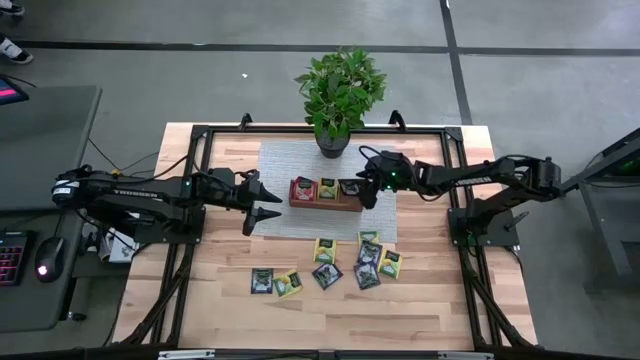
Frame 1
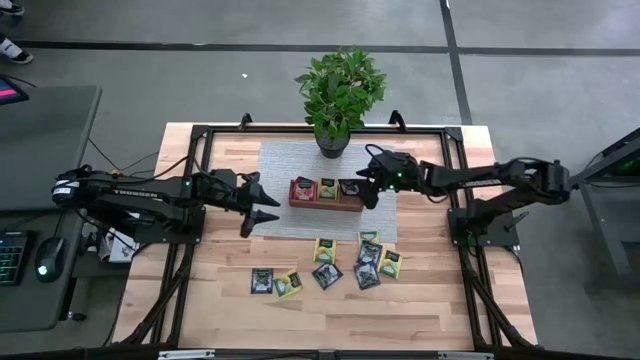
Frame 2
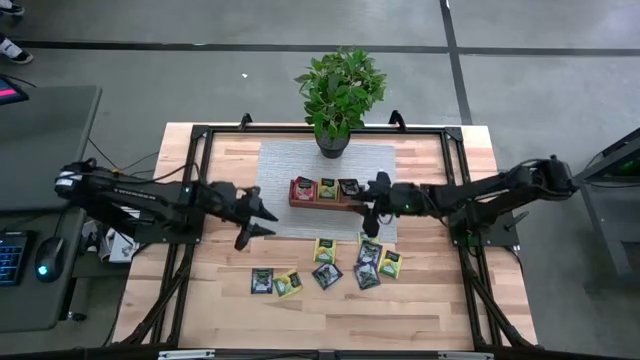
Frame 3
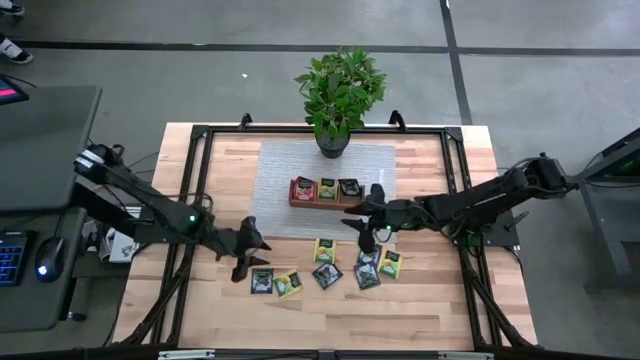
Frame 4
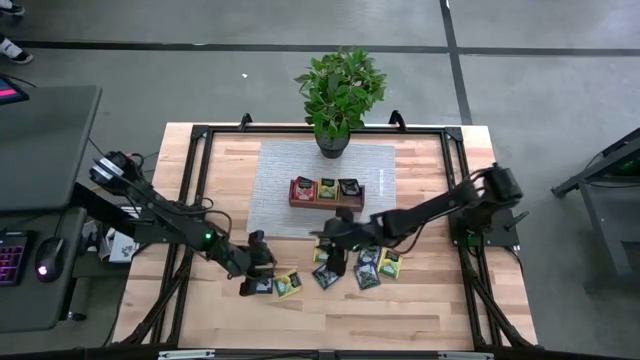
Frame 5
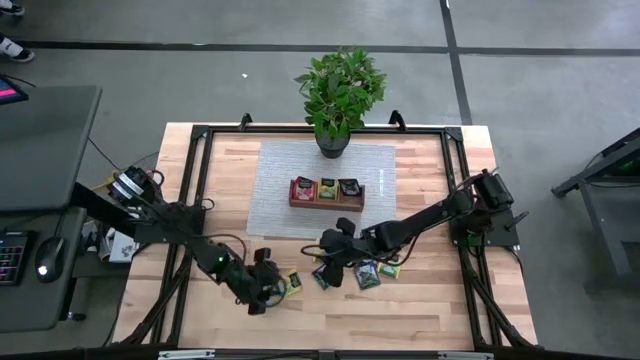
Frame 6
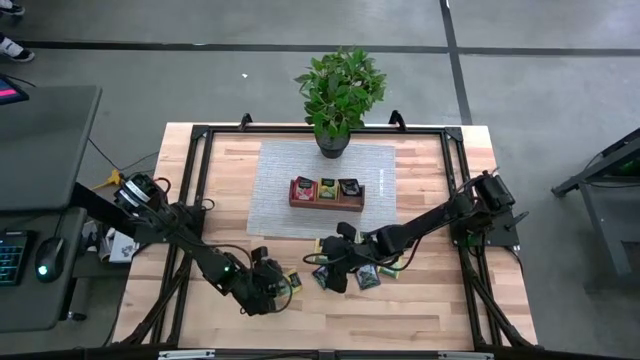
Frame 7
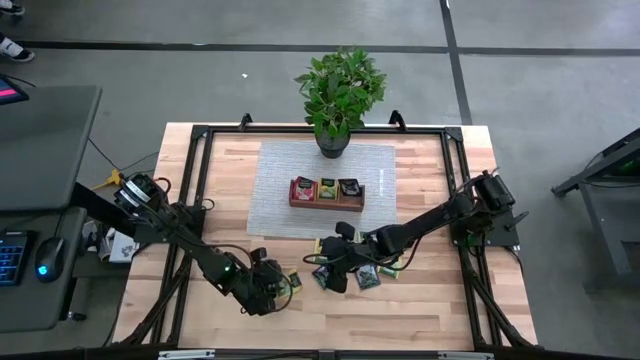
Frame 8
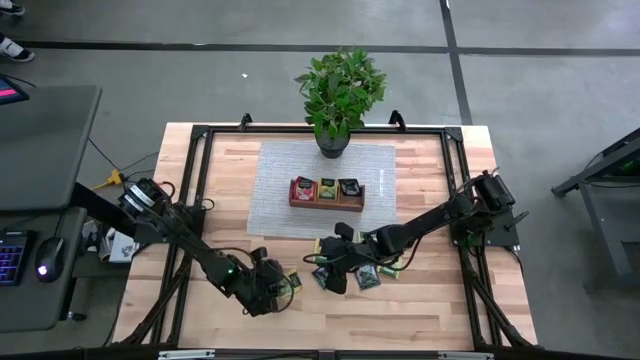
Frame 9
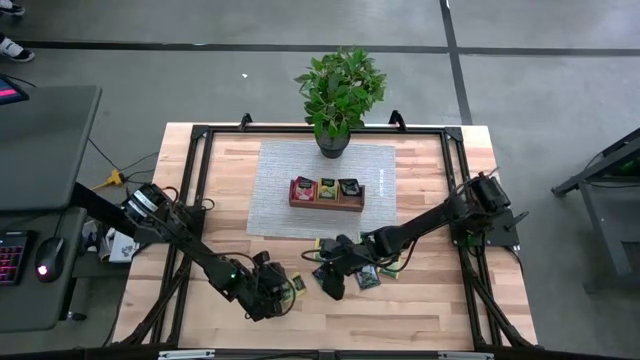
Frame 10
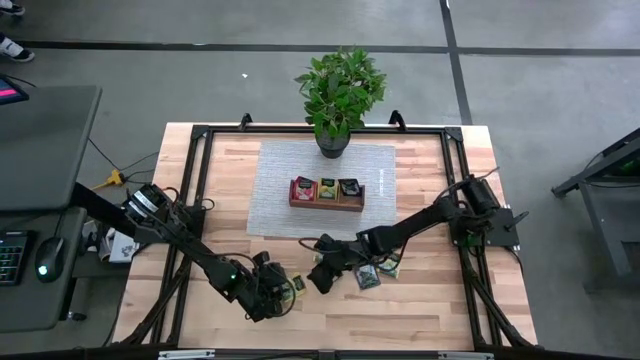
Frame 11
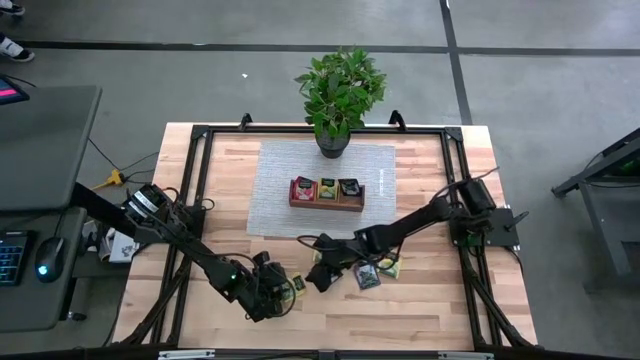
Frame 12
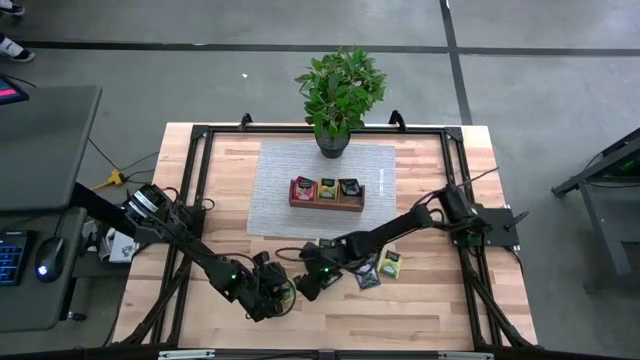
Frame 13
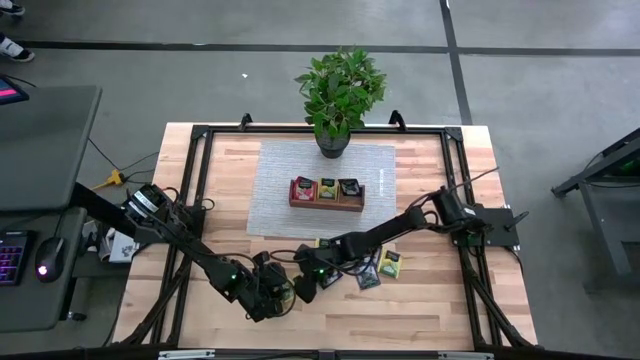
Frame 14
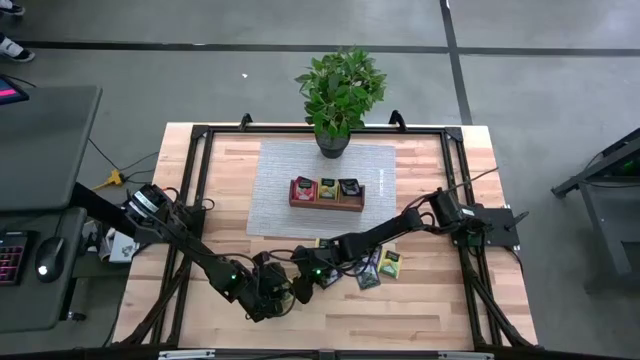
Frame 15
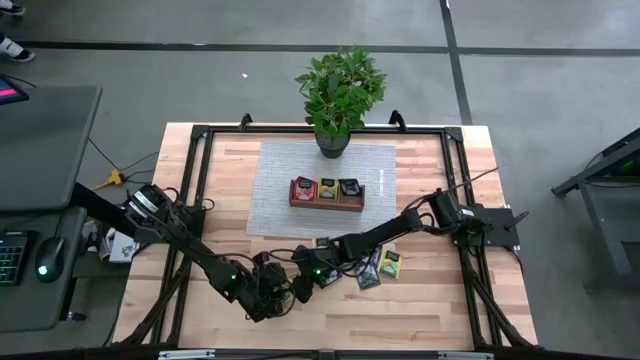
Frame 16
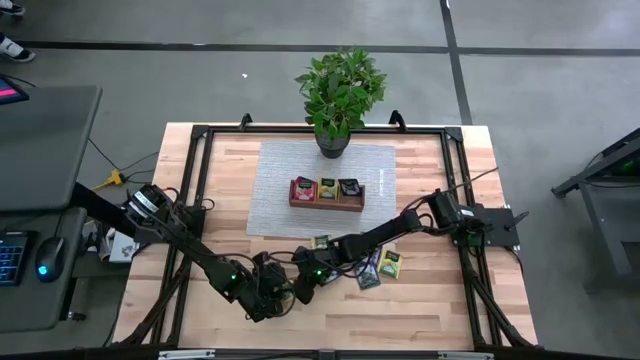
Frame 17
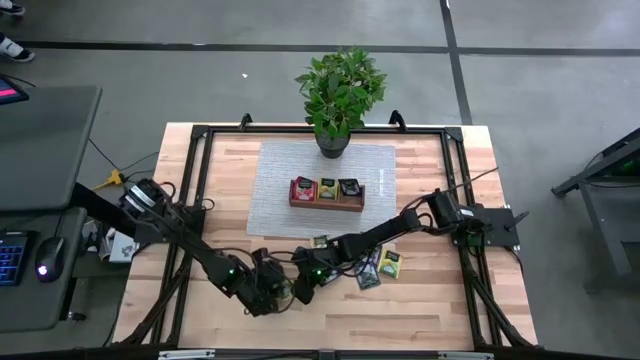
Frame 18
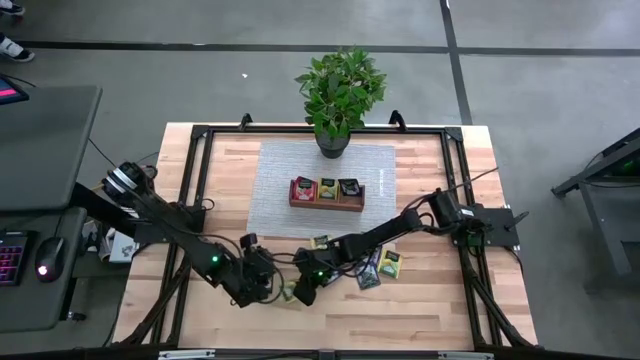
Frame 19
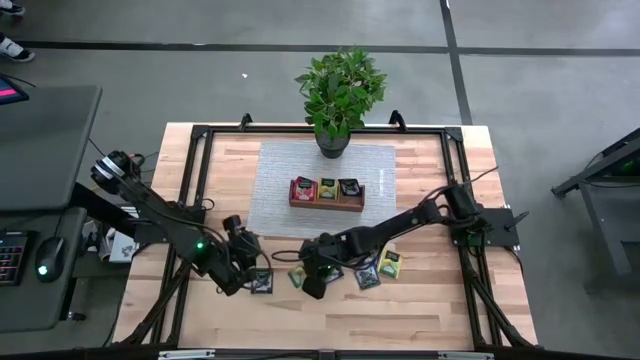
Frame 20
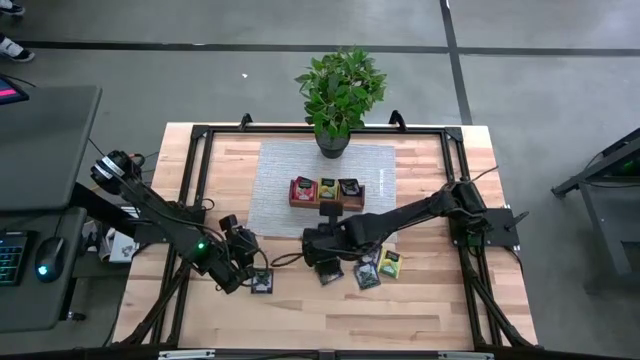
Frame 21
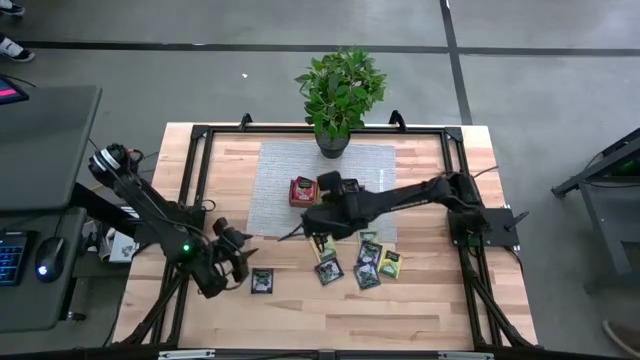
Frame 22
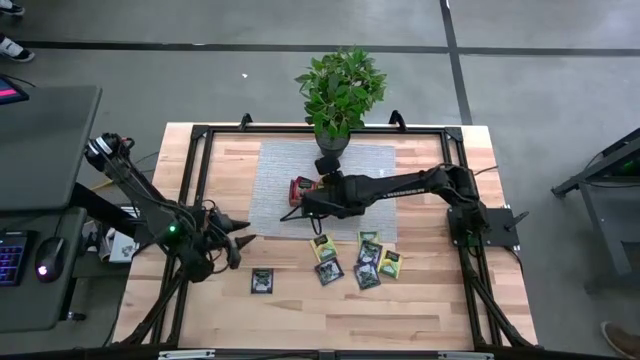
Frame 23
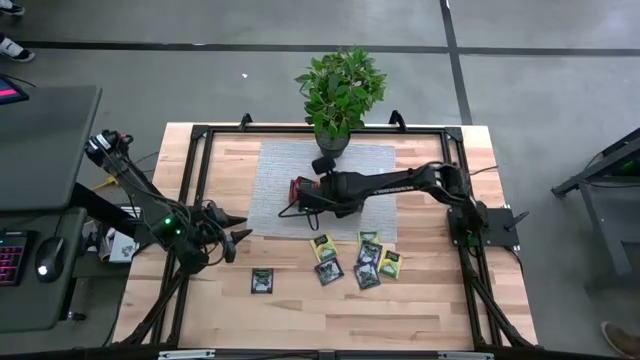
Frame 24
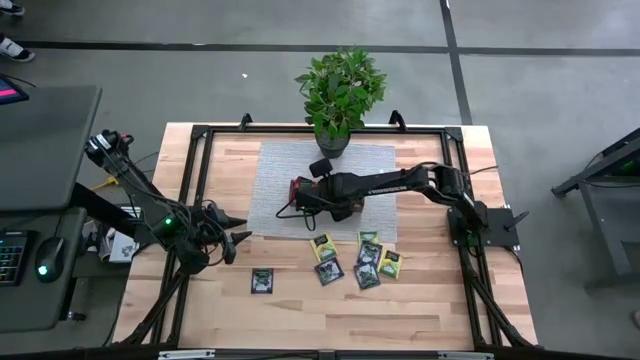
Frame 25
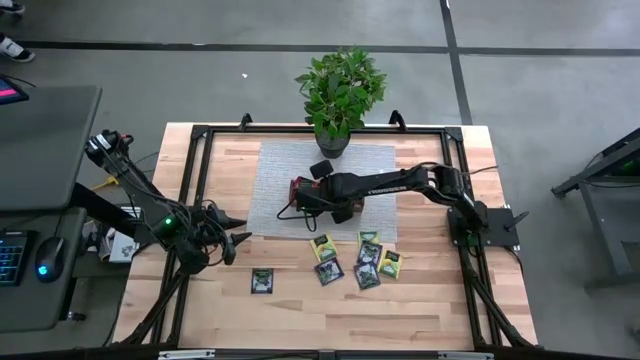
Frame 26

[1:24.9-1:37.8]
Task: Pick & Place Tea
Put the yellow tea bag into the middle section of the wooden organizer

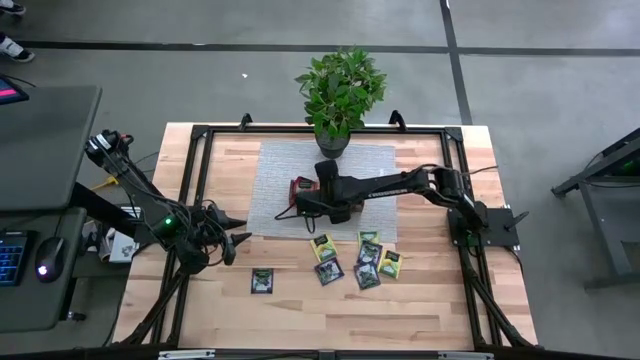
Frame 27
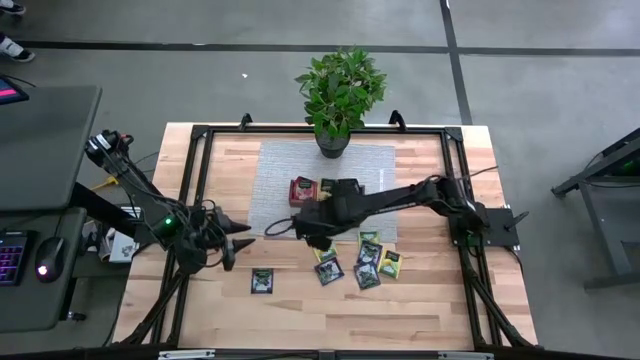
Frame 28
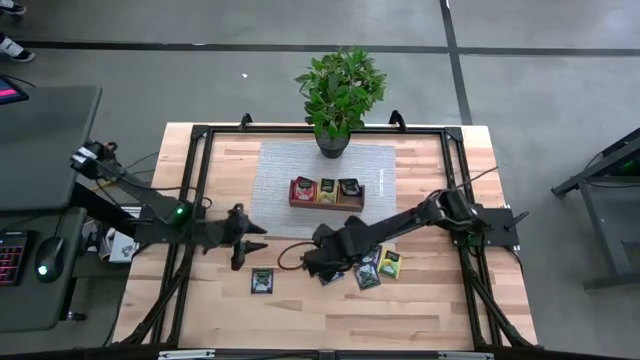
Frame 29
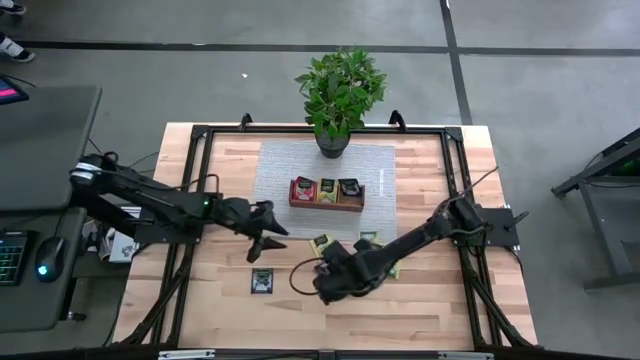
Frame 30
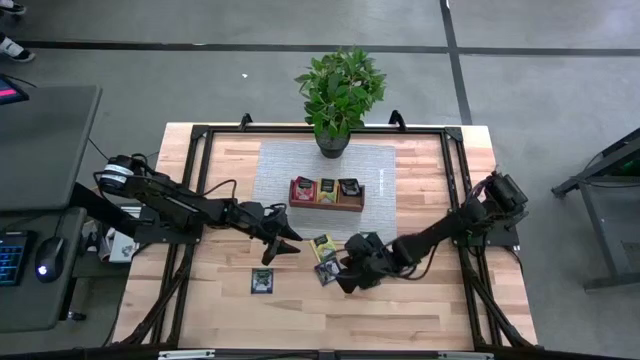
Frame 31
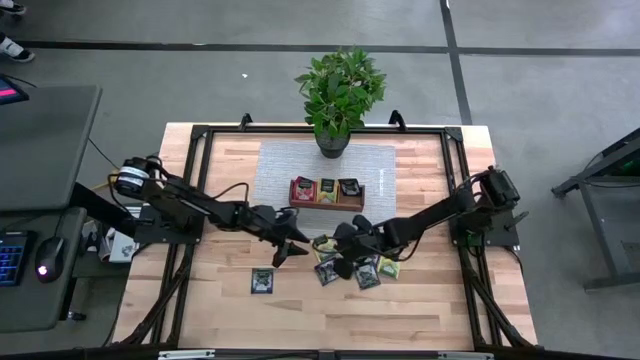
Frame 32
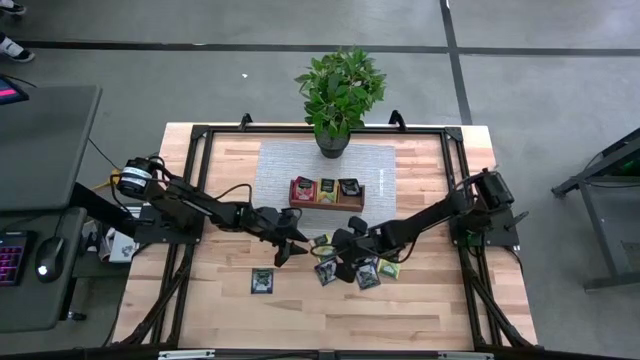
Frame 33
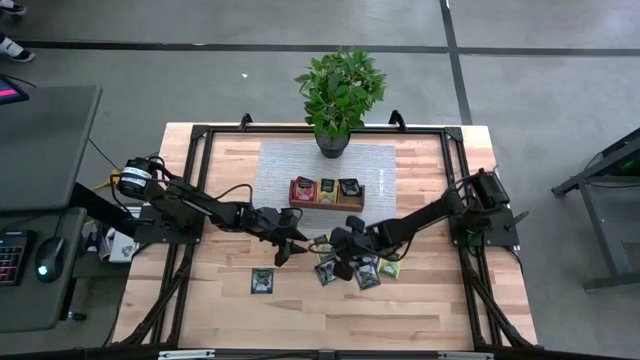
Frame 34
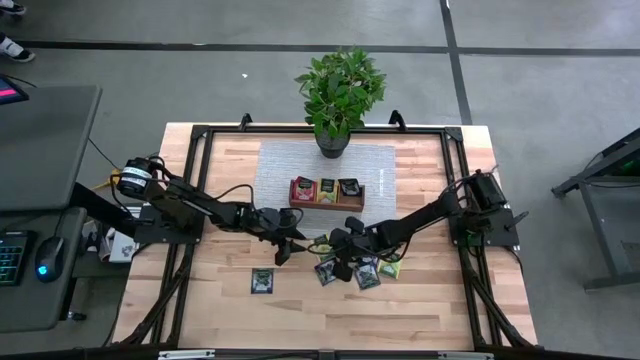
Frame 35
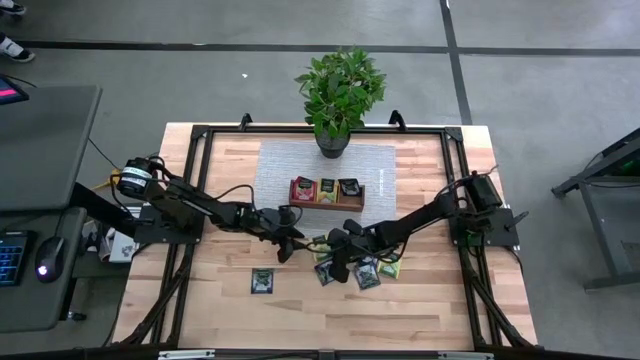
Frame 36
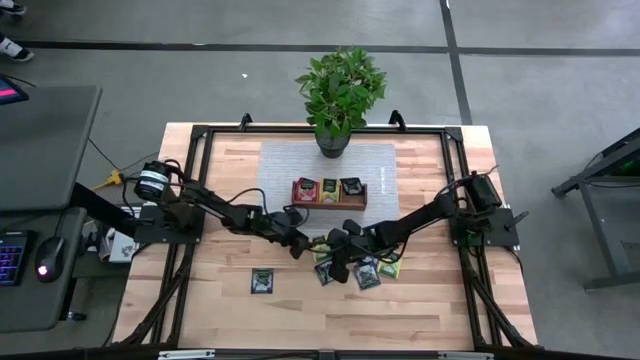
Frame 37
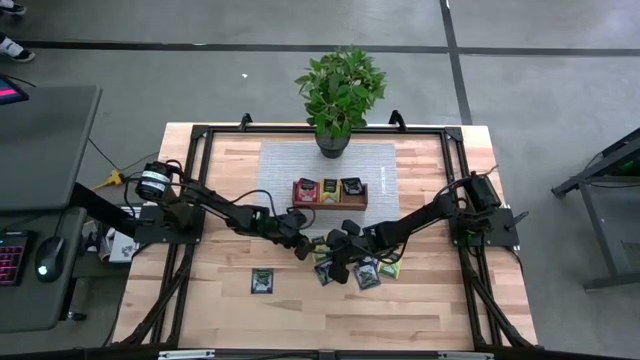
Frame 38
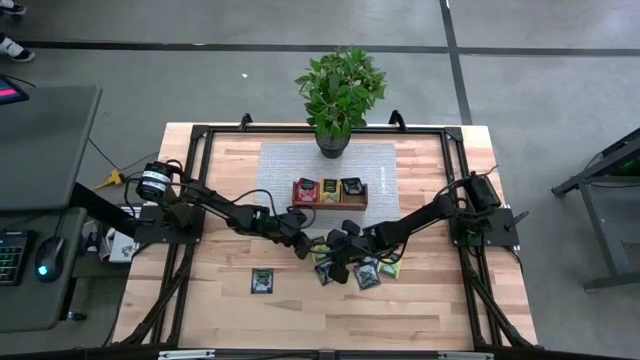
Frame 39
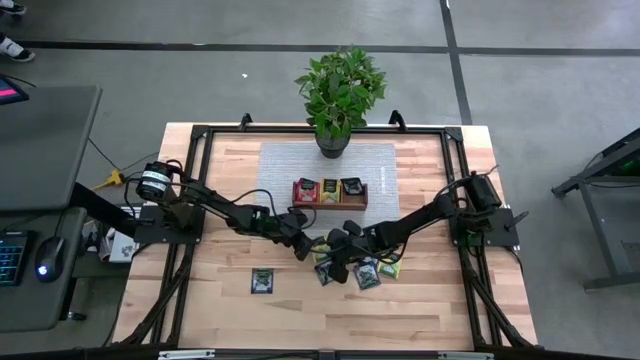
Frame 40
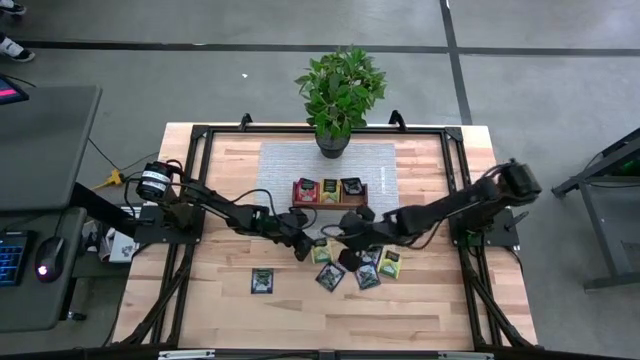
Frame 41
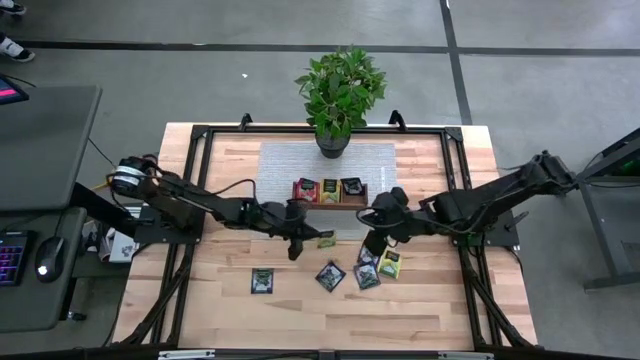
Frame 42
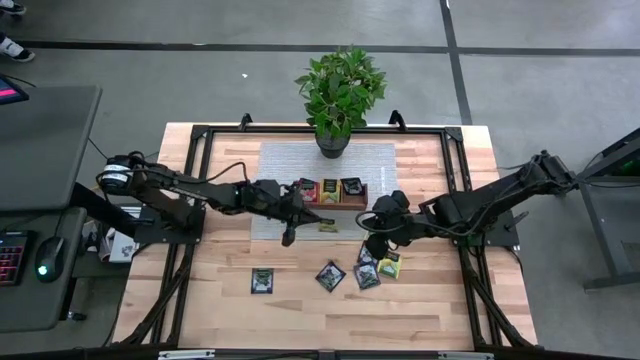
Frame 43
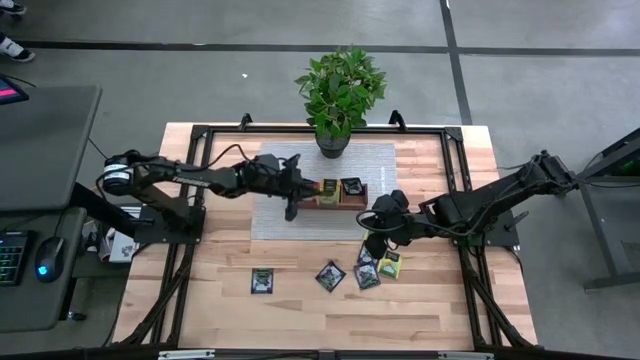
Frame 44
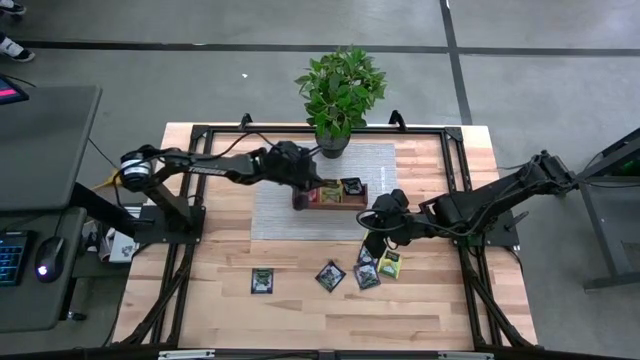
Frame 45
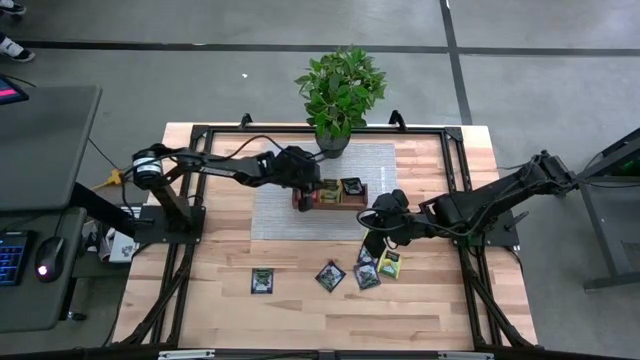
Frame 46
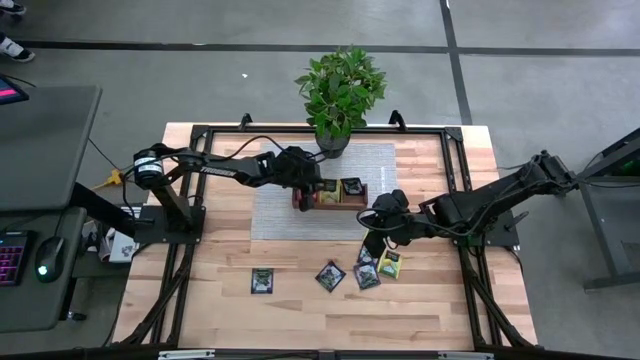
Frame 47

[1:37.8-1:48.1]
Put the yellow tea bag into the middle section of the wooden organizer
